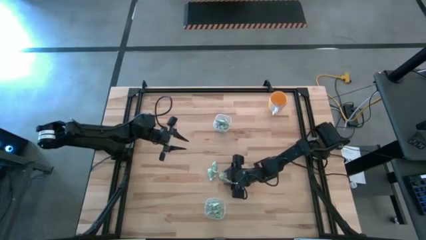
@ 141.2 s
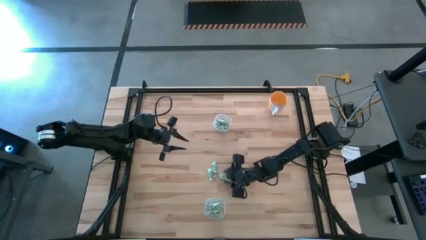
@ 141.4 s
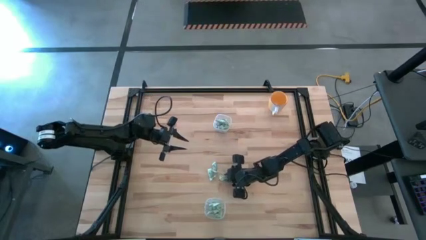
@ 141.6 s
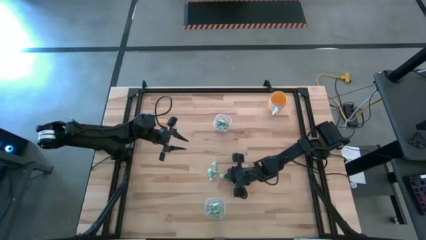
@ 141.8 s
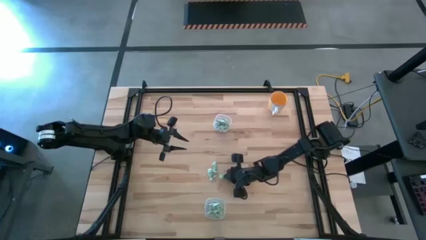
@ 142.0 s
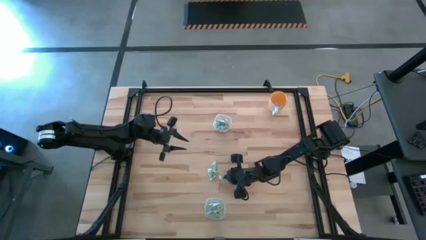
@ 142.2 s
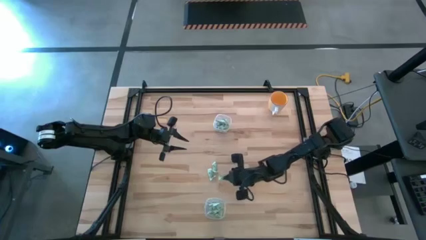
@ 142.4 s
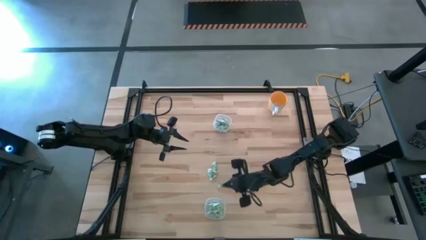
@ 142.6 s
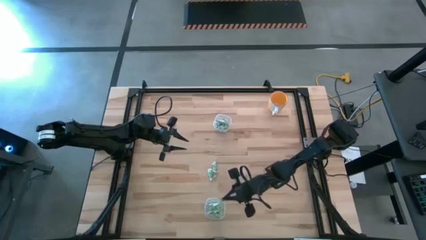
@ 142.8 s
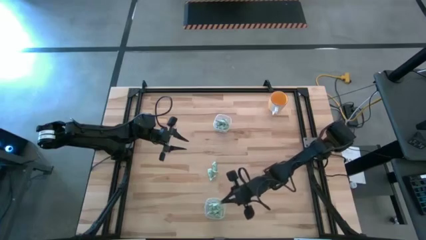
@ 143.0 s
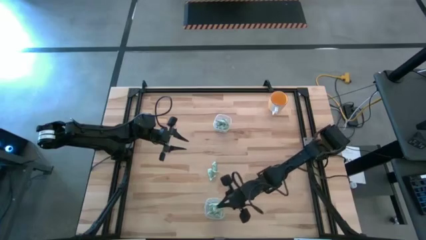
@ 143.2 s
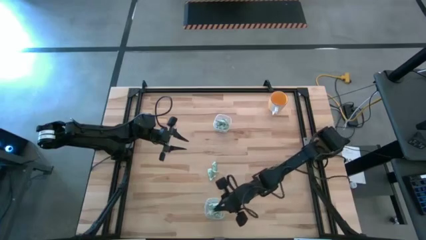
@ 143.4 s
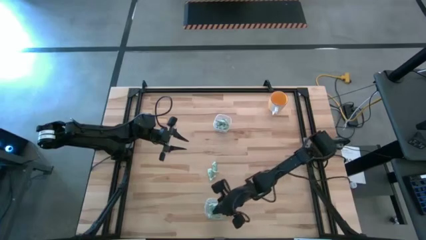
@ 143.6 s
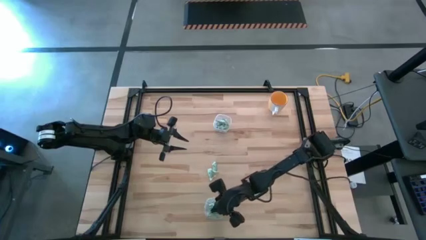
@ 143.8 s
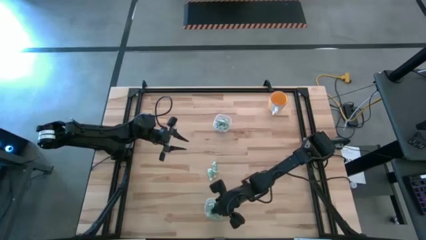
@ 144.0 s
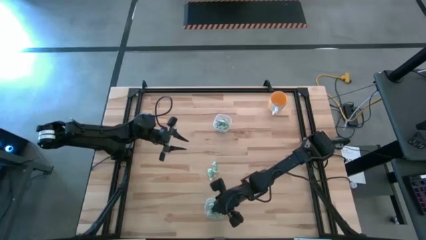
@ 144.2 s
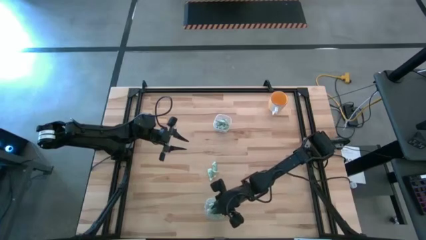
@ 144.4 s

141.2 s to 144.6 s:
Task: Pick and place items into bin
Put the stevia packet into the bottom transparent bin

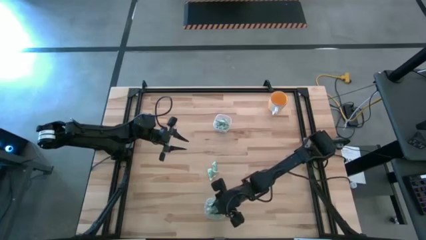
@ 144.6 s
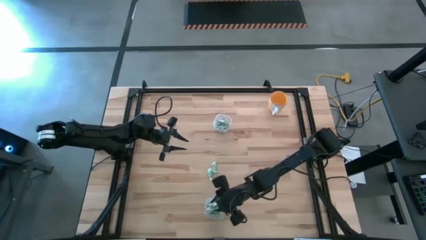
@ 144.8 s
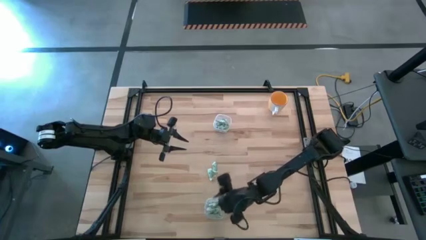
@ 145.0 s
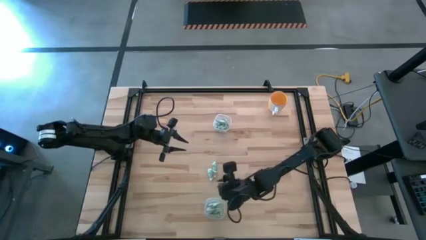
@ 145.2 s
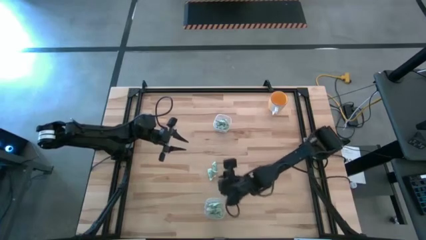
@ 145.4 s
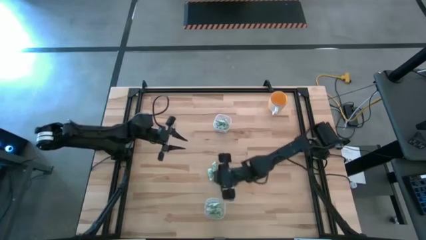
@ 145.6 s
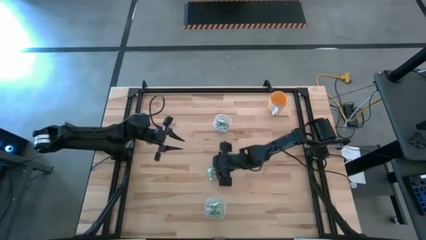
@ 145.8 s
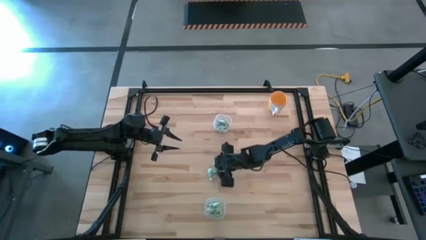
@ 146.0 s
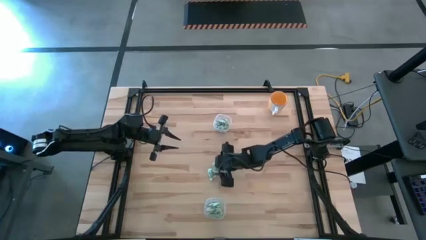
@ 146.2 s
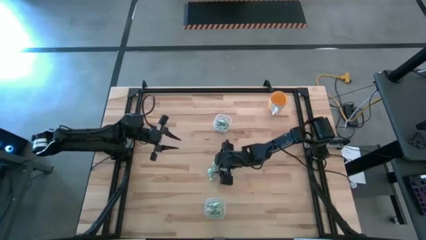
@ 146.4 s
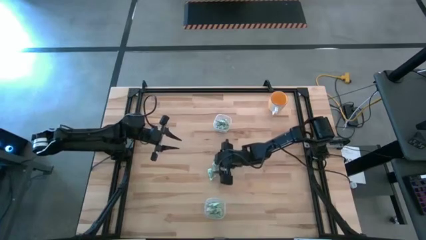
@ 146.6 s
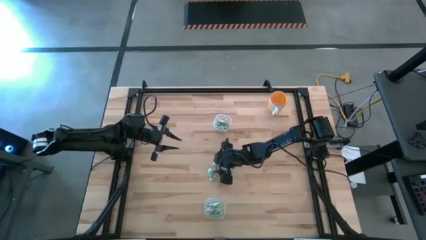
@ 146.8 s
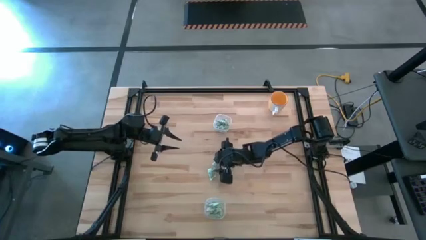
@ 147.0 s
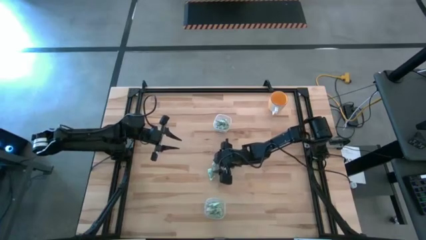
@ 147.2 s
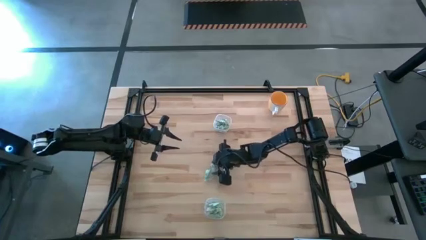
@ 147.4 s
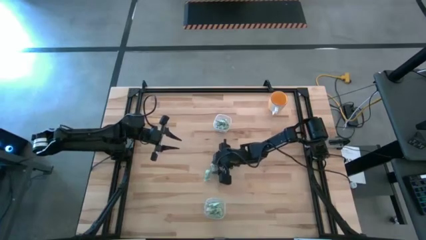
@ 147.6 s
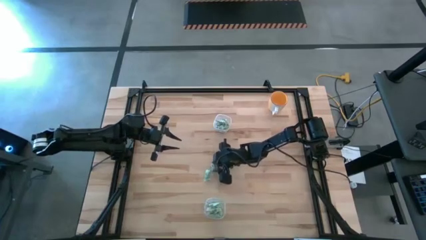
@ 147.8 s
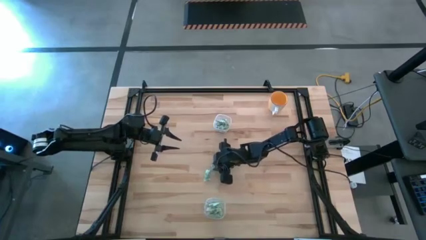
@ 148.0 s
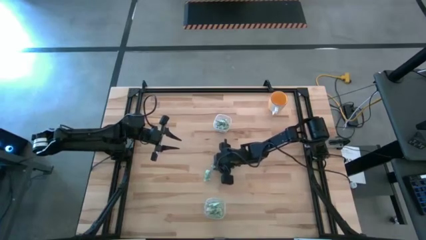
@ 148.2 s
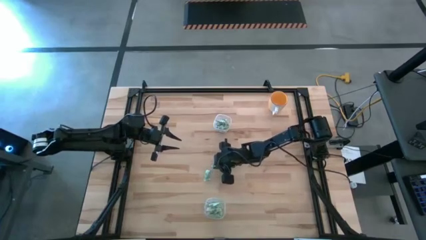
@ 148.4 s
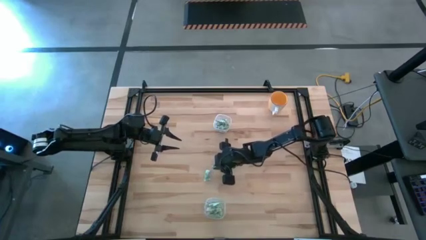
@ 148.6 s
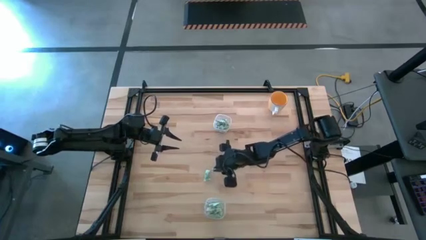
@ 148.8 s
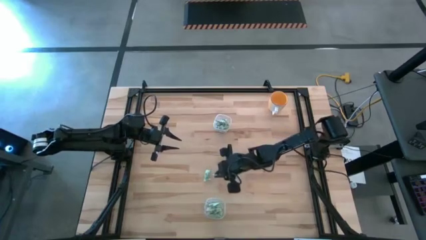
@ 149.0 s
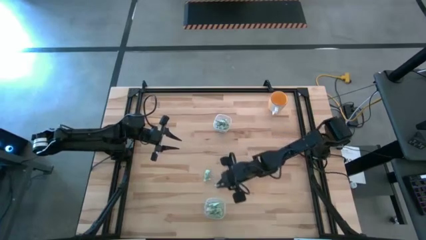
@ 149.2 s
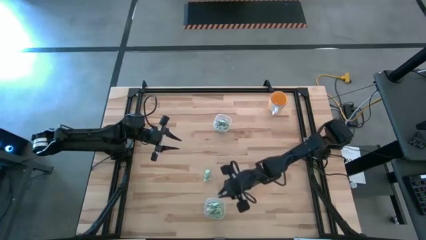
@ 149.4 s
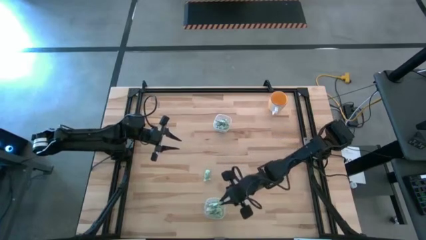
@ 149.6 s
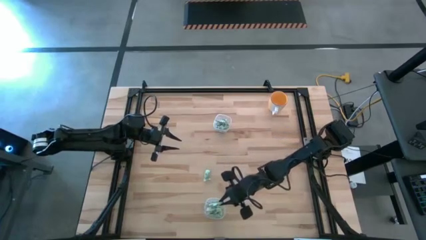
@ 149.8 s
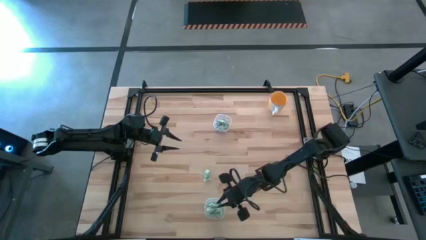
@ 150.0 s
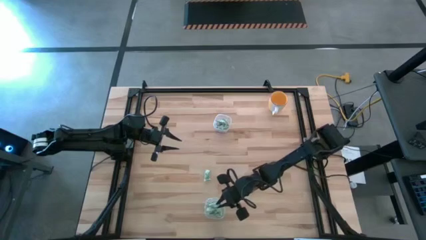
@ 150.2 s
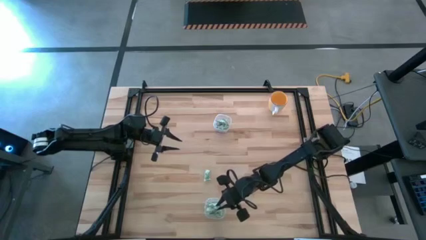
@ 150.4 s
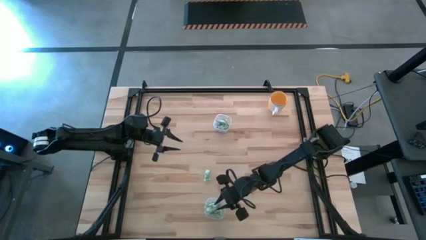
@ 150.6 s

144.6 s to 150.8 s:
Put the stevia packet into the bottom transparent bin

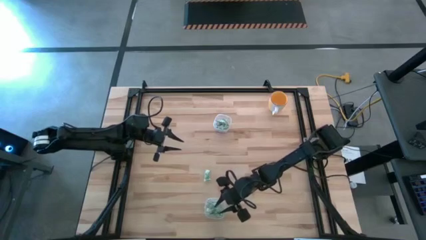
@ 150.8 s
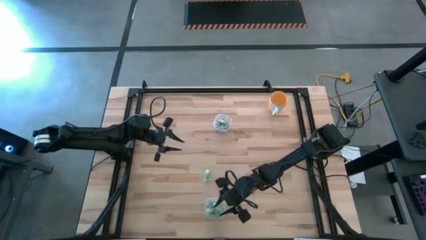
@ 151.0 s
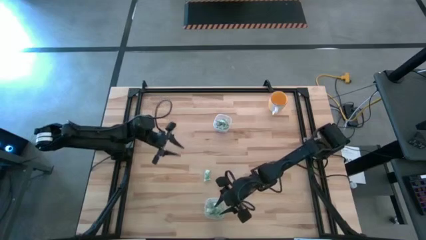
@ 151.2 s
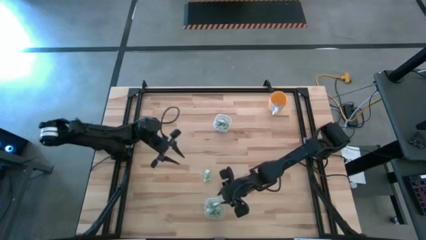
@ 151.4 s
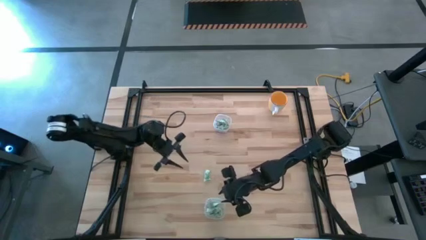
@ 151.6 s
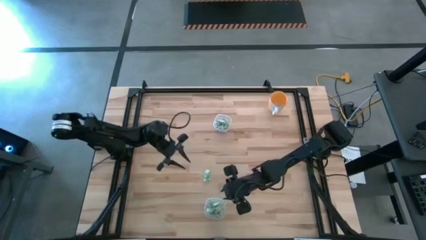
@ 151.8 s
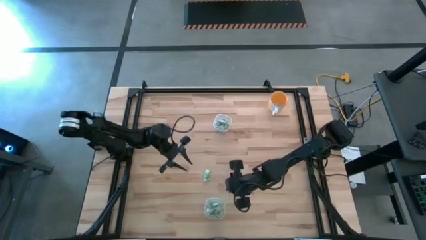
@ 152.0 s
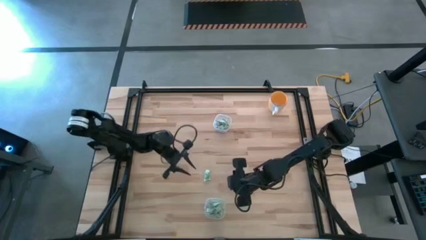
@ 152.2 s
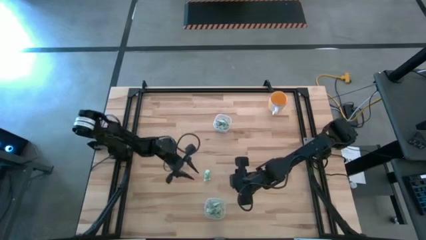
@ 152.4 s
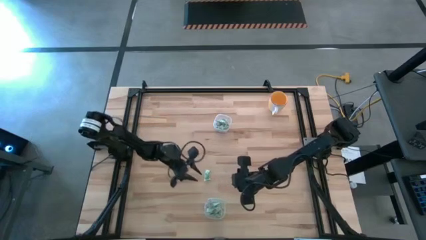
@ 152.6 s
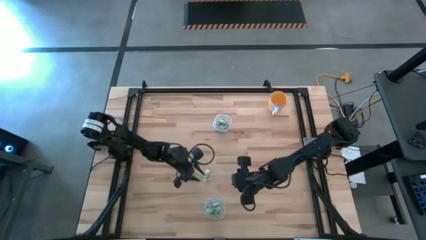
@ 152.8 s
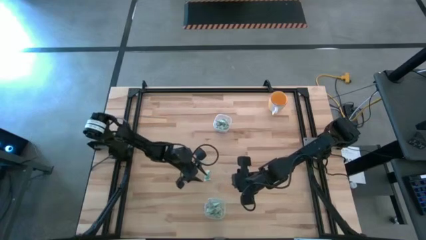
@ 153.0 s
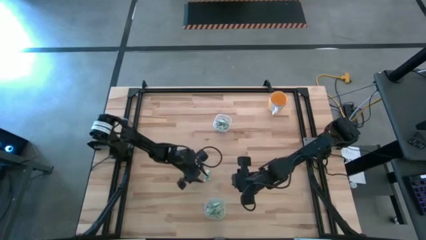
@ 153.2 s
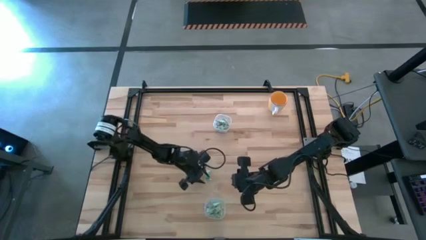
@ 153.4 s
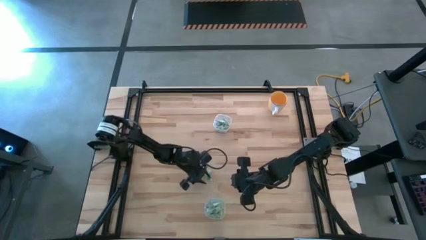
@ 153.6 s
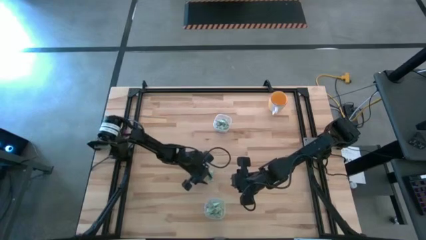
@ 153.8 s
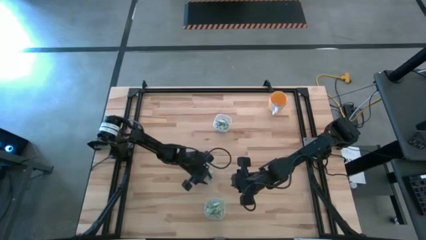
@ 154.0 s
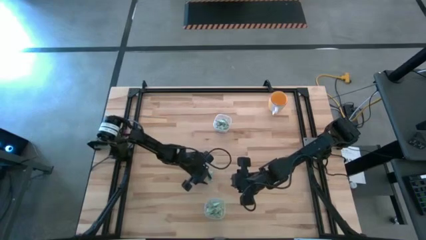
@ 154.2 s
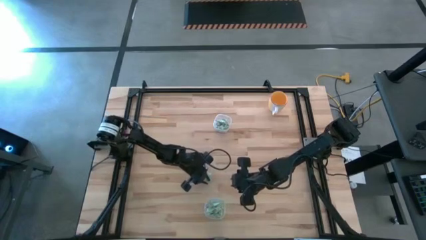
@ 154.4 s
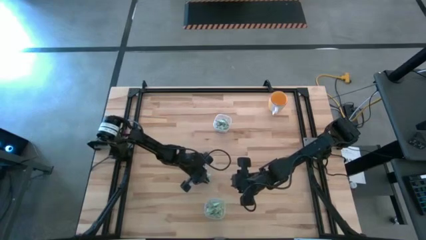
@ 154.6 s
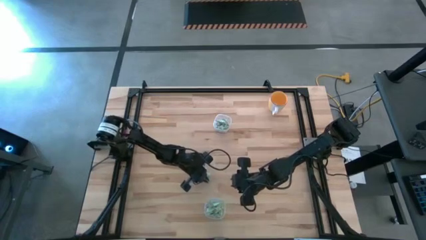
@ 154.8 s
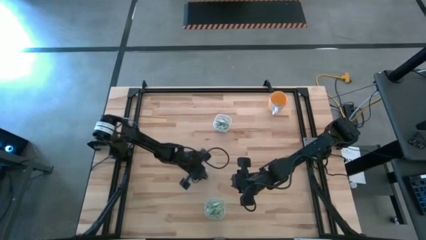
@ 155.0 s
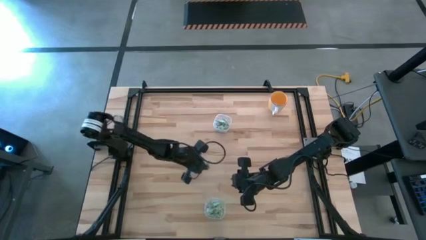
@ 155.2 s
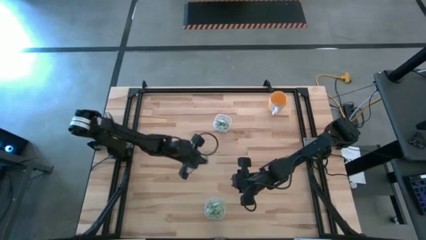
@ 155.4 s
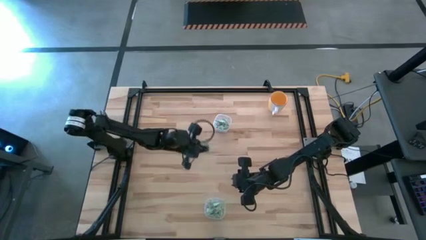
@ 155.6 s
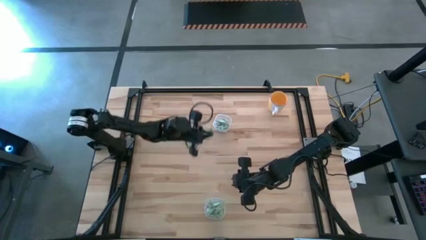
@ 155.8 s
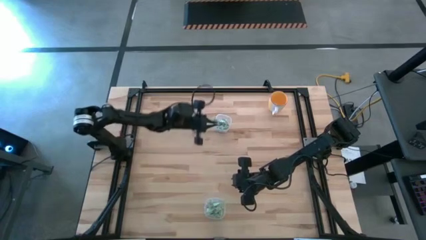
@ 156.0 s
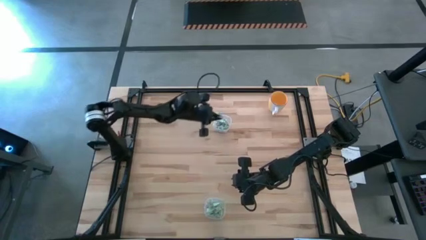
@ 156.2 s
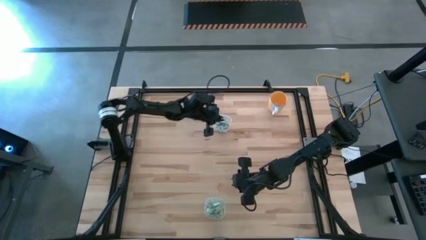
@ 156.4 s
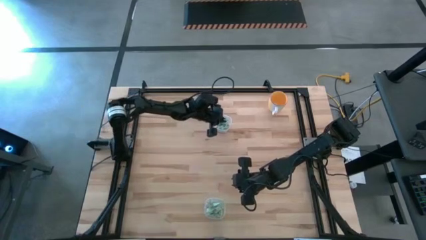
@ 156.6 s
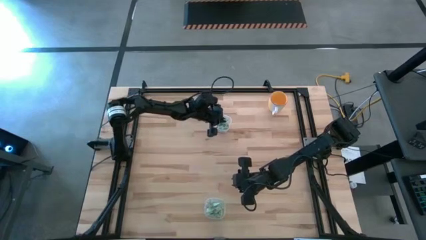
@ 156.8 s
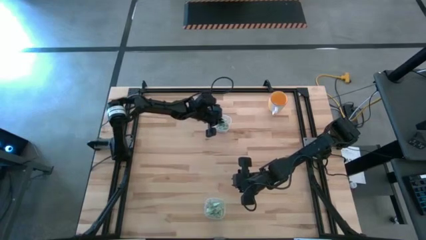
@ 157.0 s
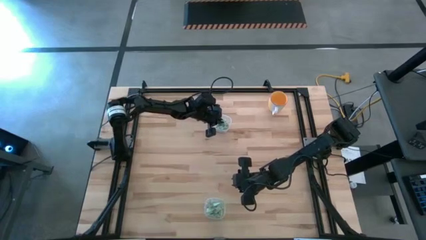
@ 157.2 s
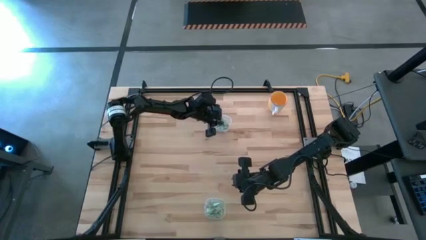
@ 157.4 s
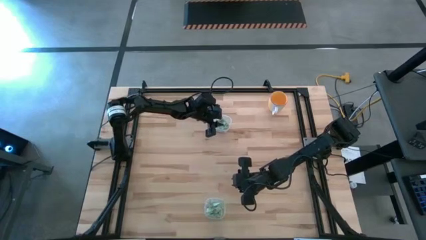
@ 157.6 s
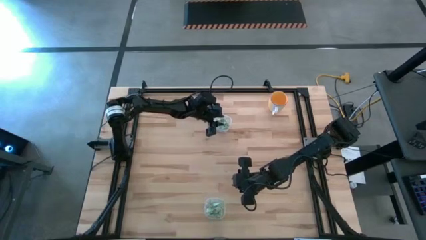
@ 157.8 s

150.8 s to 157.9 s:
Put the stevia packet into the top transparent bin
